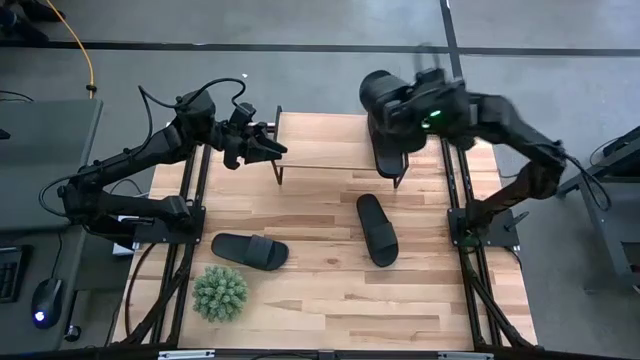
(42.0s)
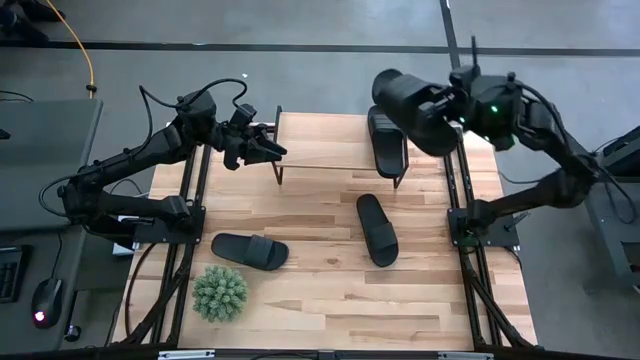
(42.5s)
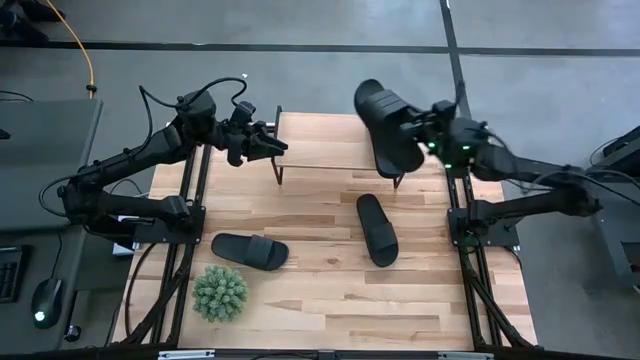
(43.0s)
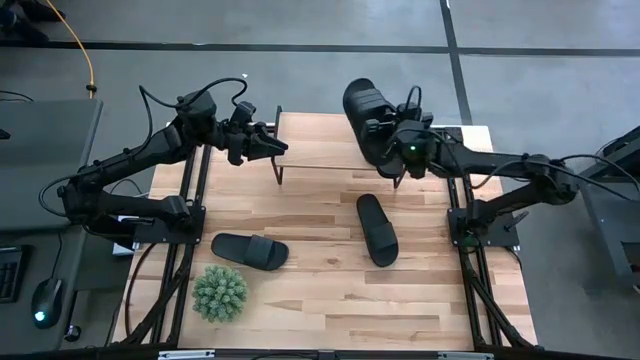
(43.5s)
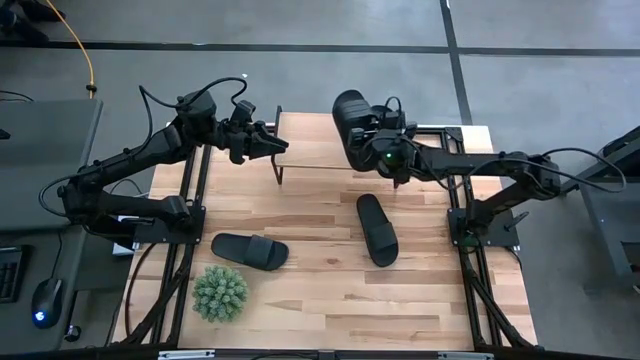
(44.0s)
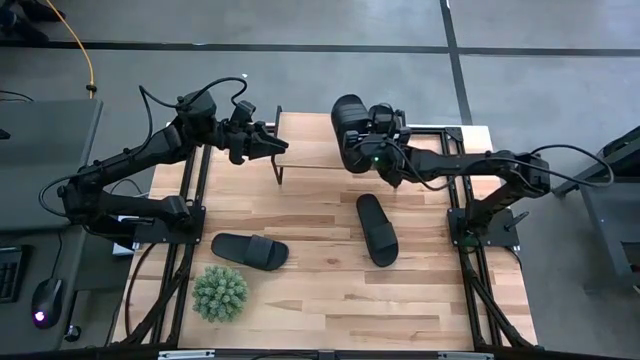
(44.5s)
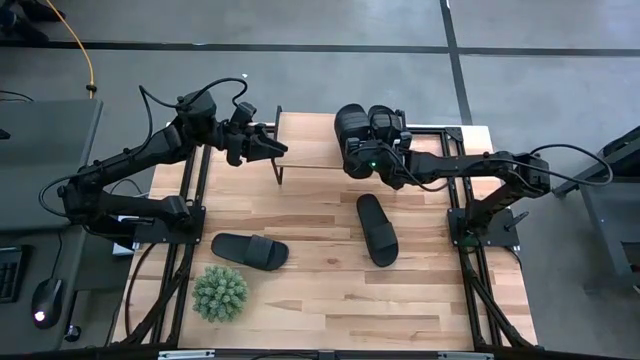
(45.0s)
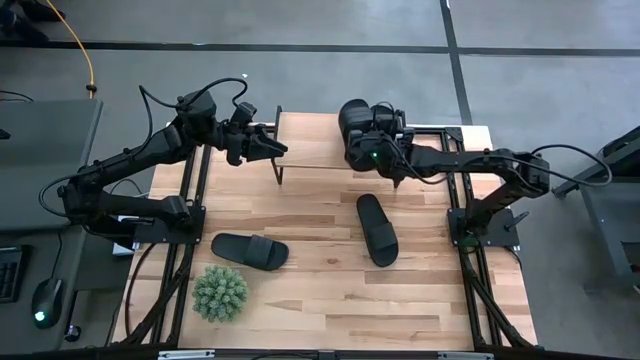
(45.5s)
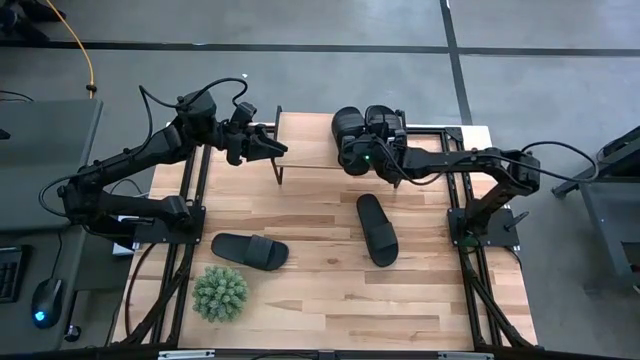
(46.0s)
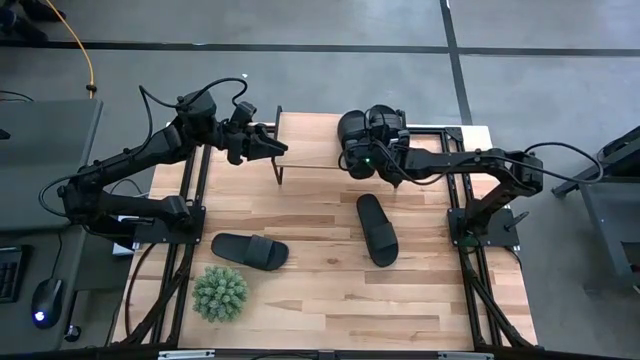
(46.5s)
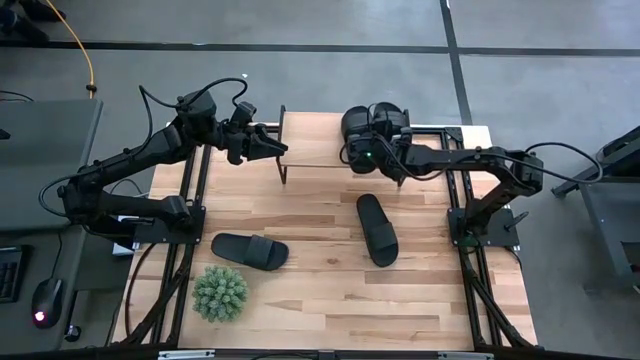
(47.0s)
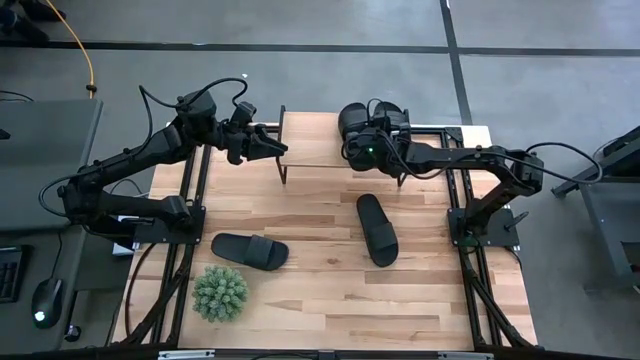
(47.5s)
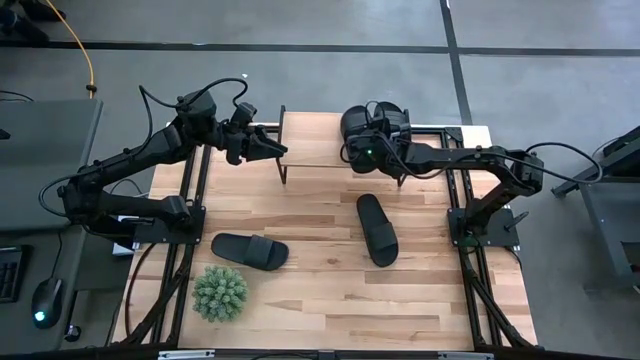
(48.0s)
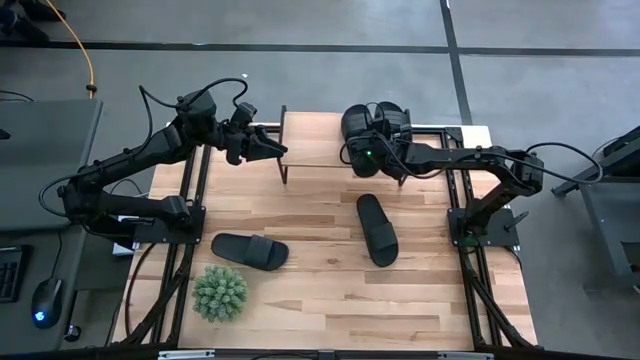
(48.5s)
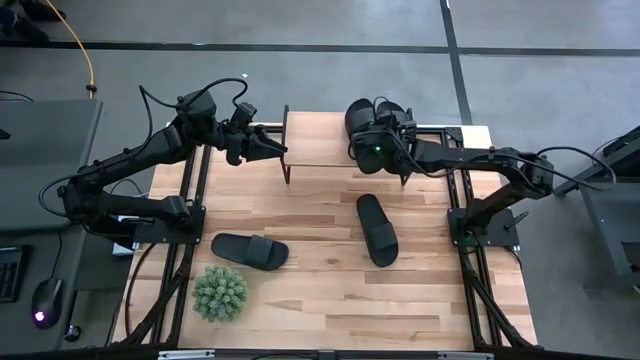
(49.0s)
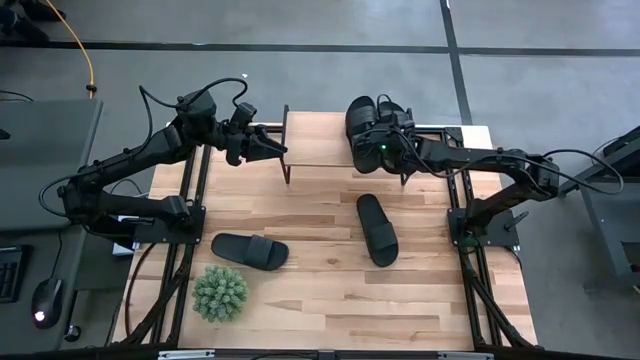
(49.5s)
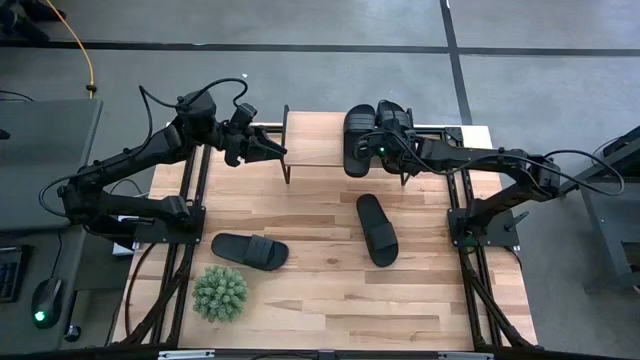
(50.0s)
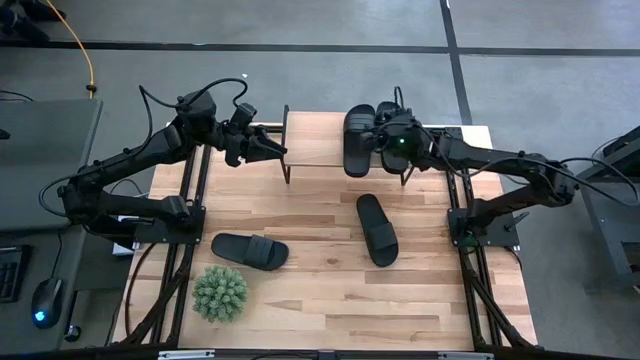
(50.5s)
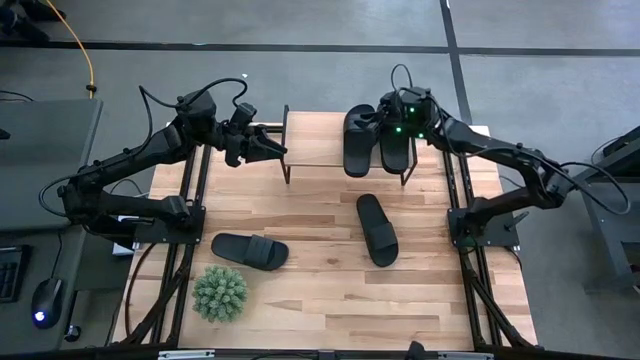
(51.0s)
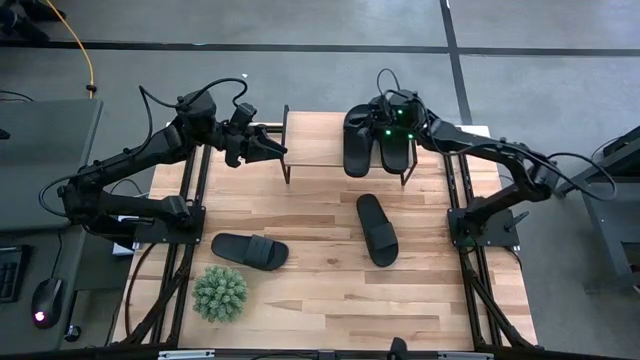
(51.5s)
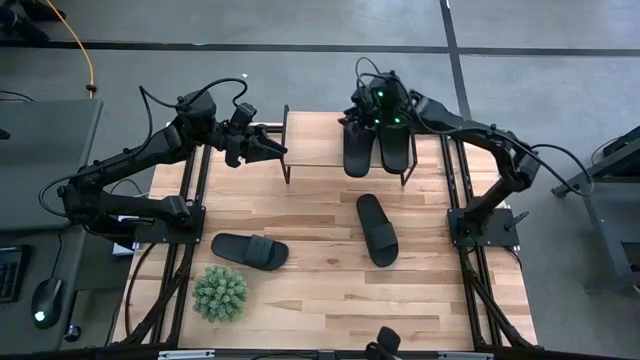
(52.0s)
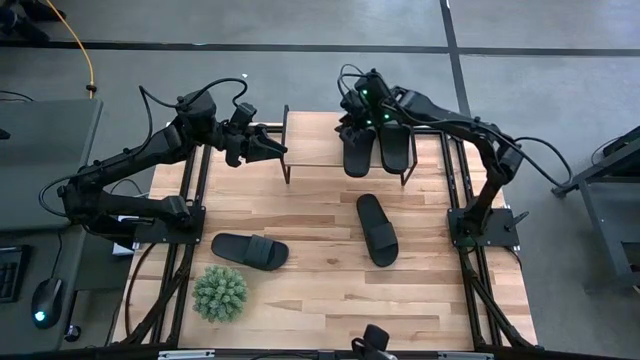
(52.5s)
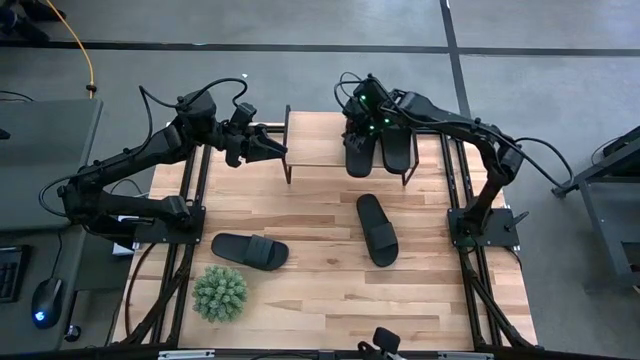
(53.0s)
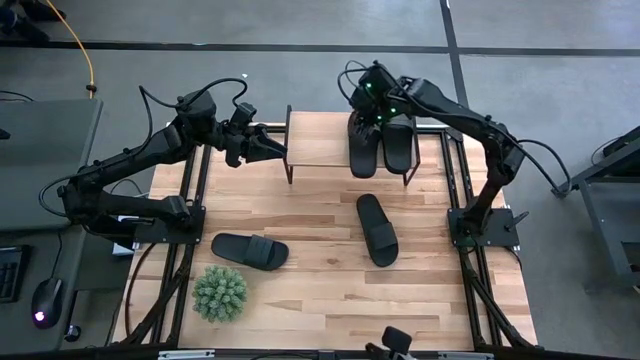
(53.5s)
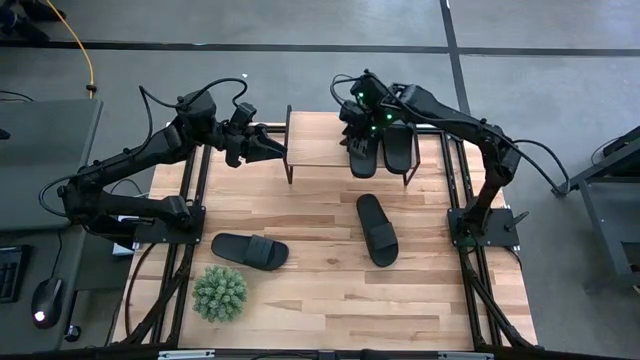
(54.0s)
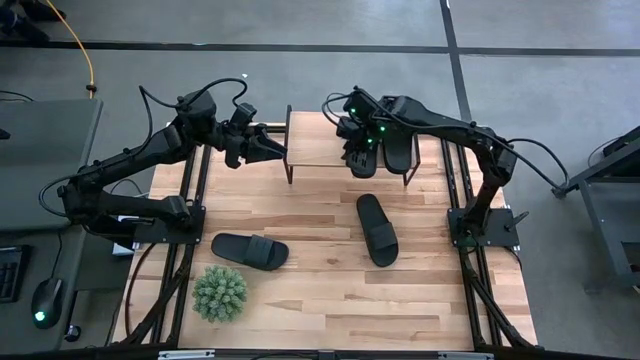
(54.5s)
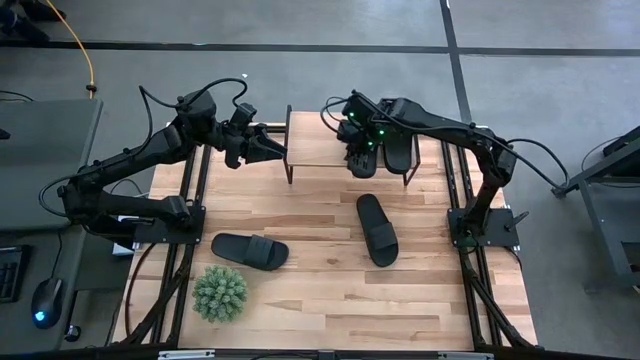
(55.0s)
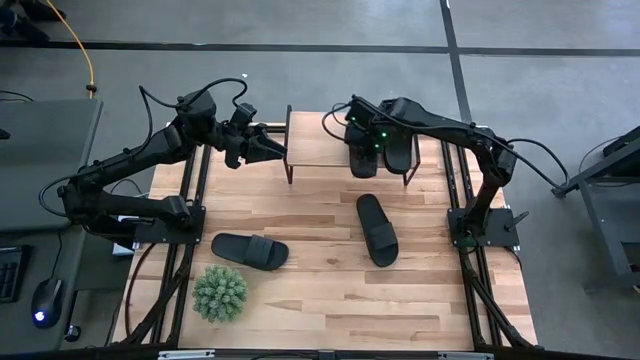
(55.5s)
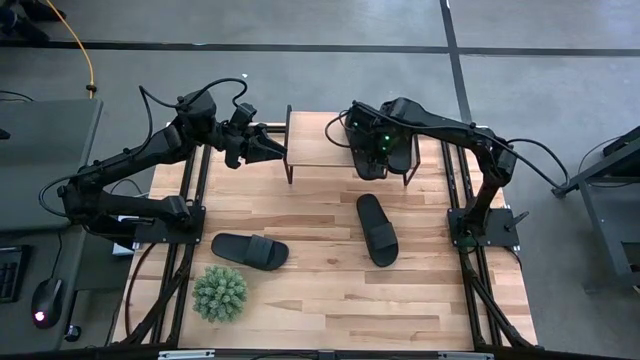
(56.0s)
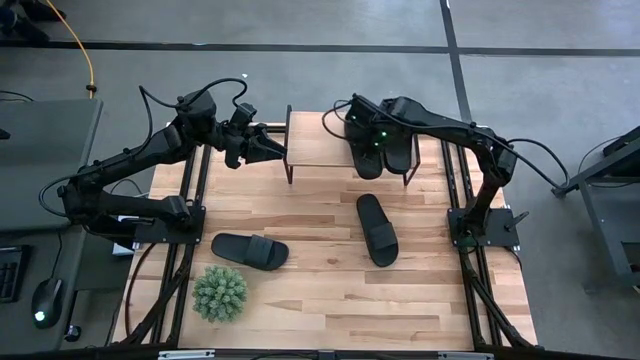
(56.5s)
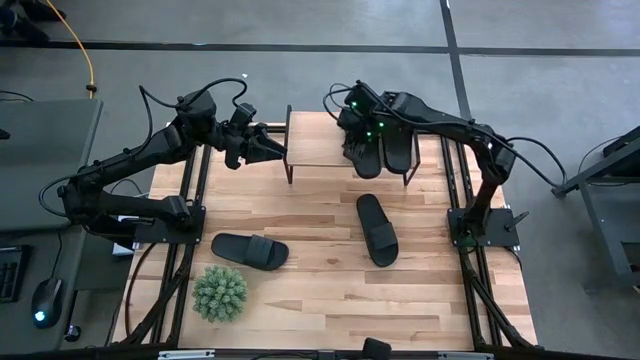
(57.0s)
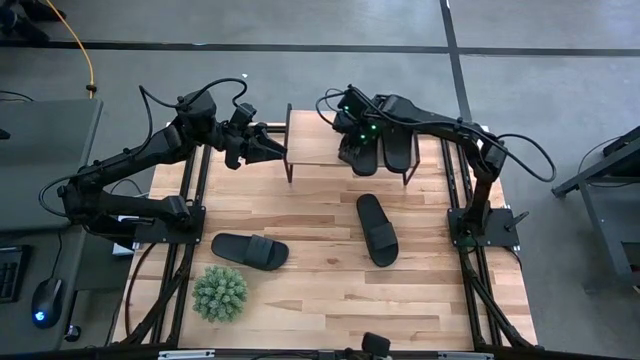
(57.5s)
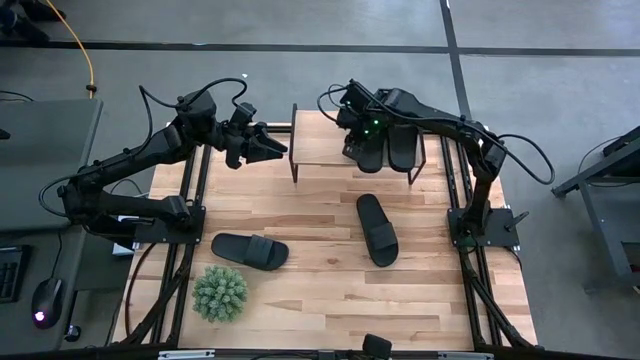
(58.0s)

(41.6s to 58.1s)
Task: Pick and place slides into the shelf
Put the black slipper on the shelf

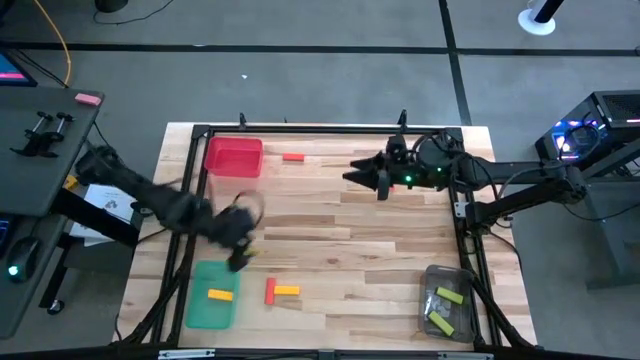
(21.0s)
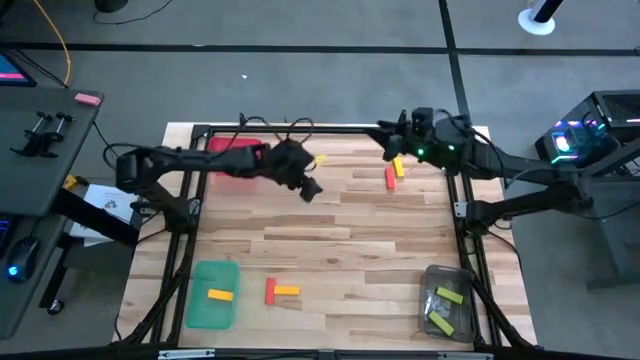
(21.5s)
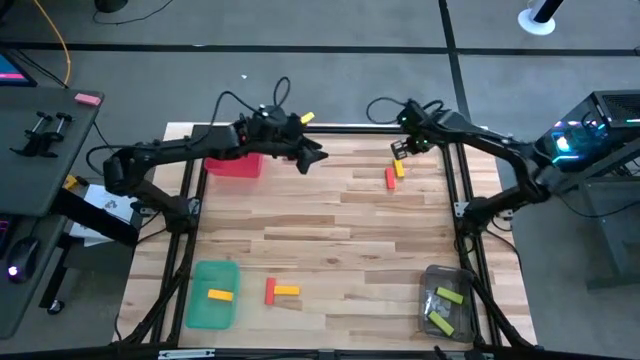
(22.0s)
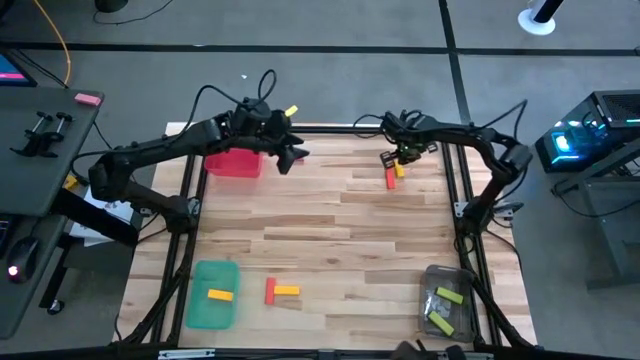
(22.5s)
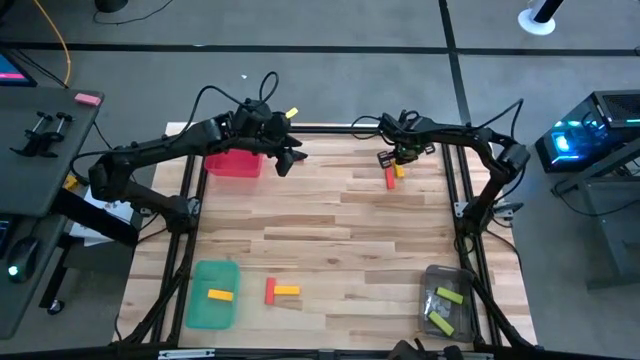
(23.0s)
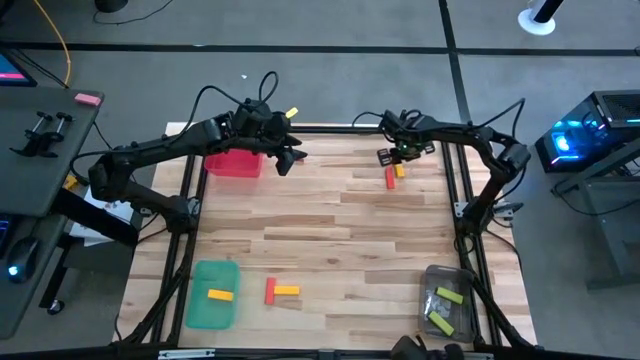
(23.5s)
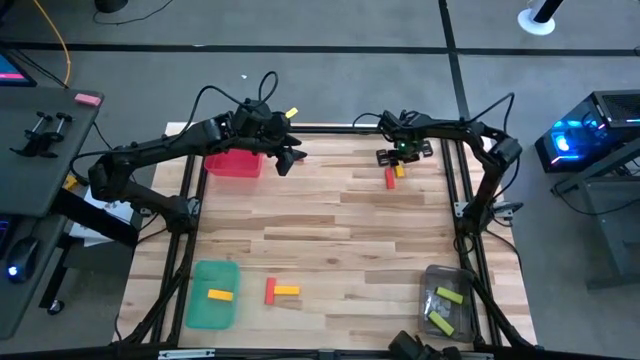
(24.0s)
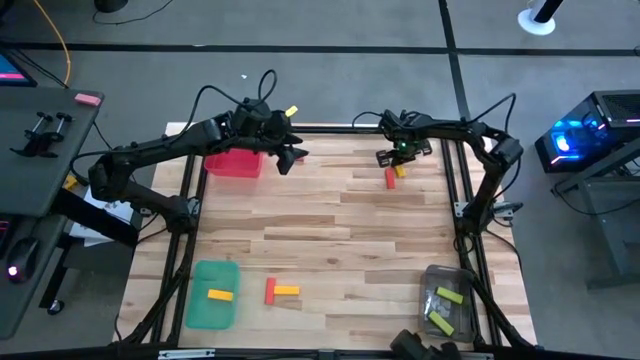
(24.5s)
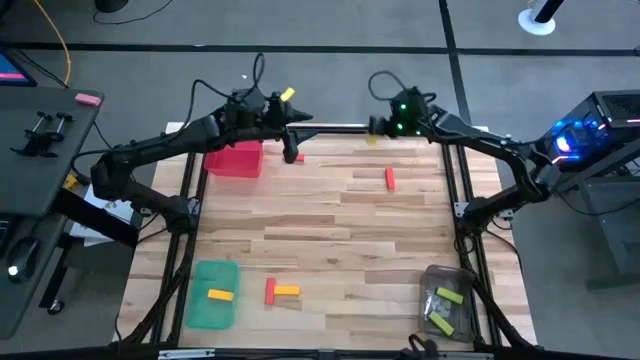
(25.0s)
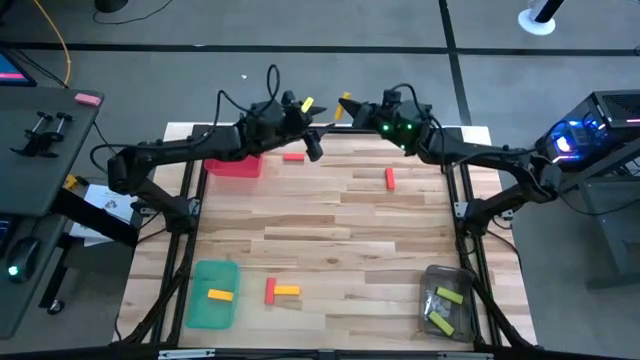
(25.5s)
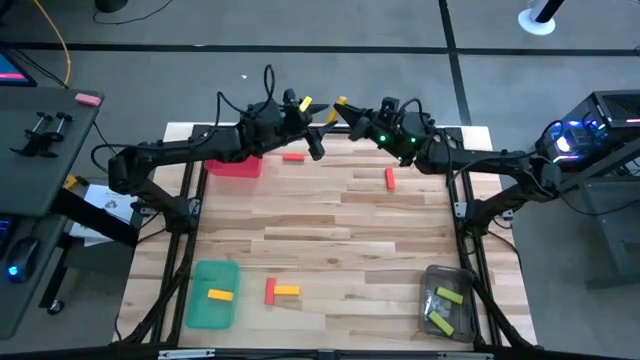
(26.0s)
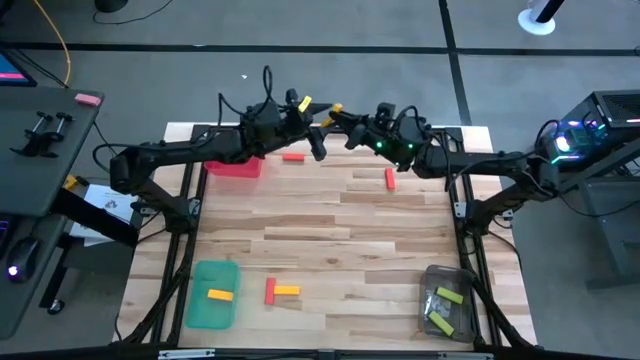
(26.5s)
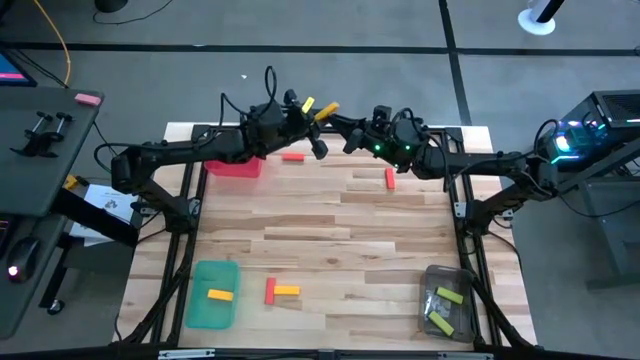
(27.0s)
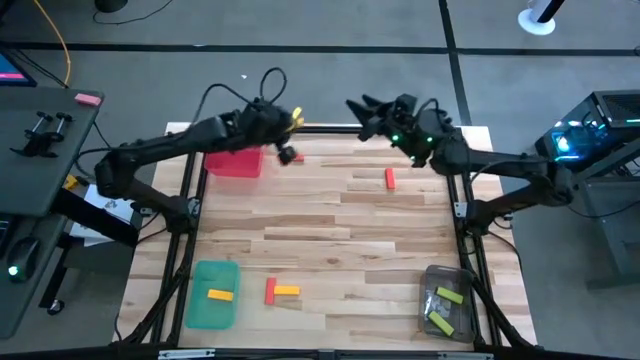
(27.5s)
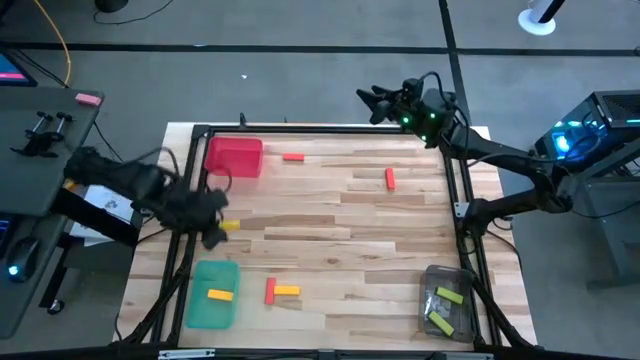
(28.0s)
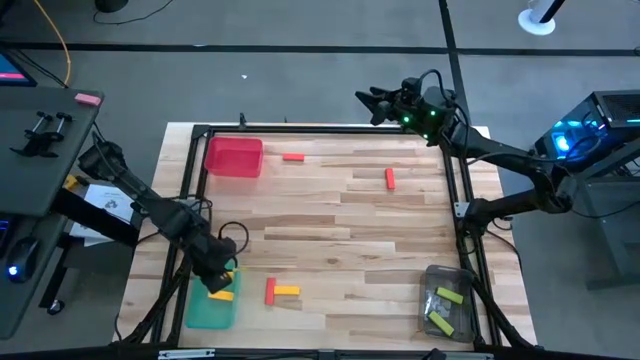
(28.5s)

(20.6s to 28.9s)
Task: Sort blocks
Put the right yellow block into the green bin
